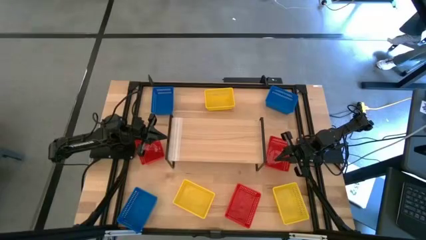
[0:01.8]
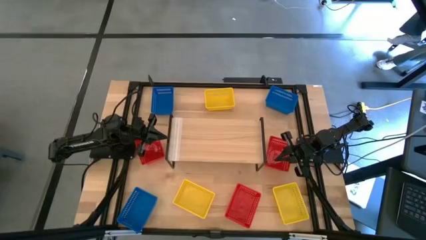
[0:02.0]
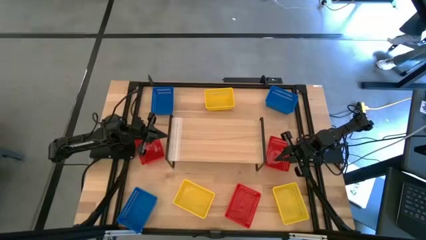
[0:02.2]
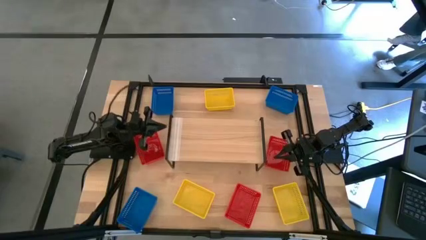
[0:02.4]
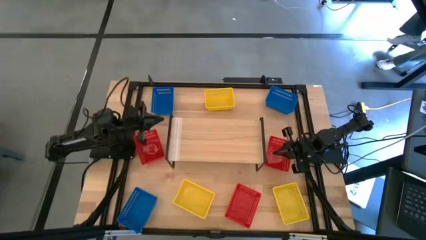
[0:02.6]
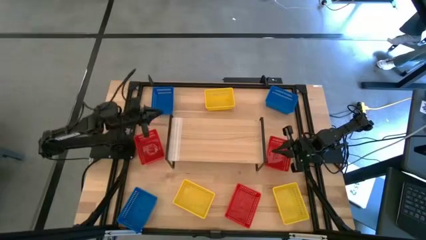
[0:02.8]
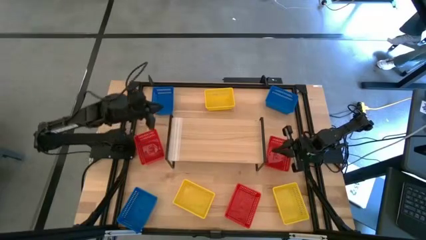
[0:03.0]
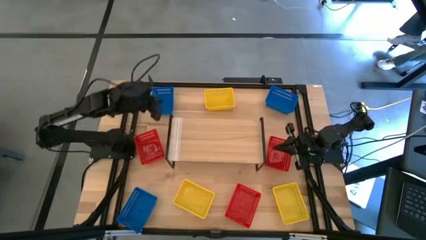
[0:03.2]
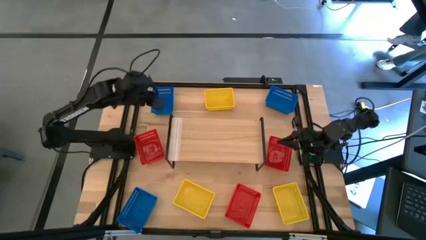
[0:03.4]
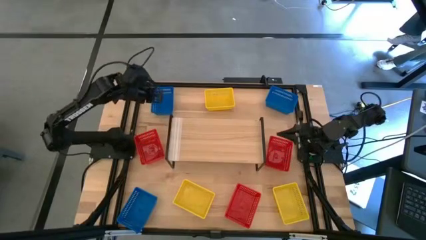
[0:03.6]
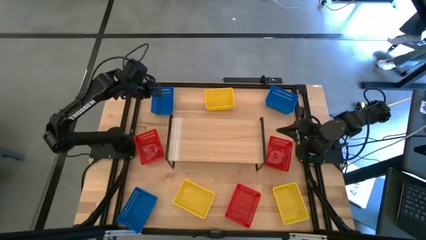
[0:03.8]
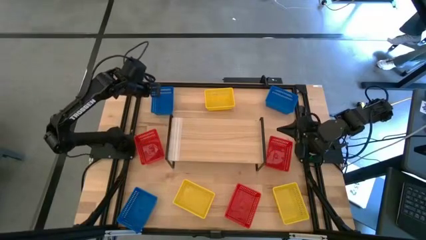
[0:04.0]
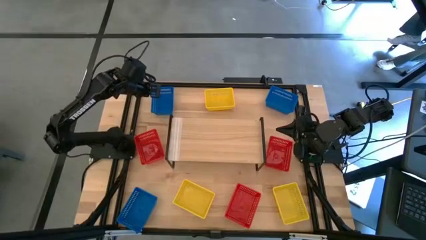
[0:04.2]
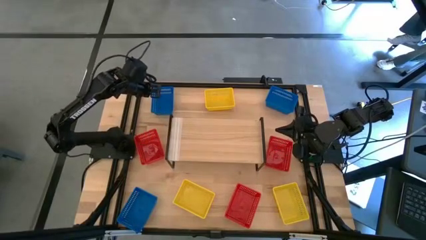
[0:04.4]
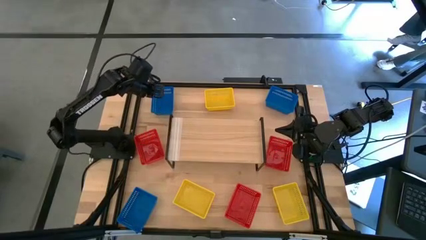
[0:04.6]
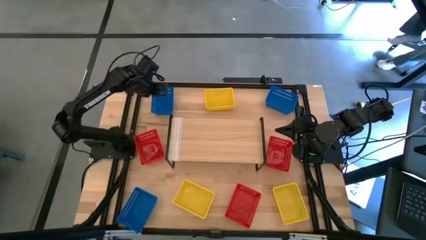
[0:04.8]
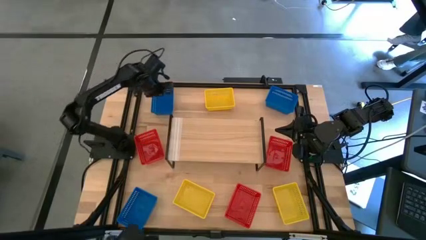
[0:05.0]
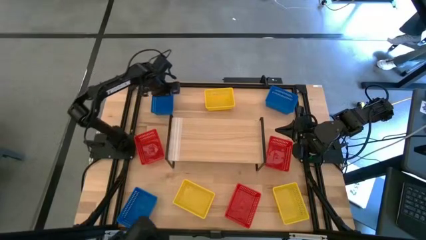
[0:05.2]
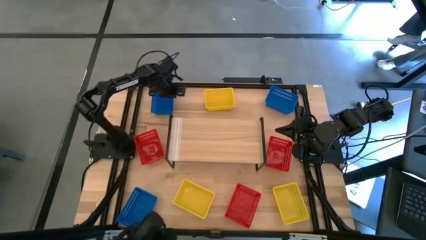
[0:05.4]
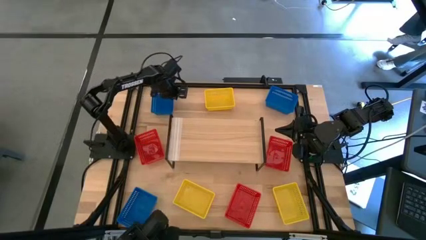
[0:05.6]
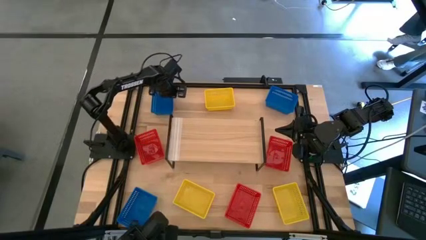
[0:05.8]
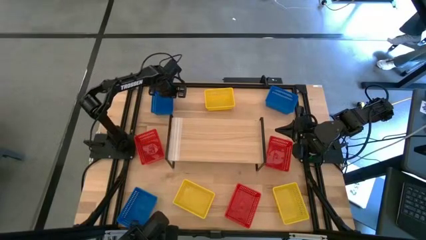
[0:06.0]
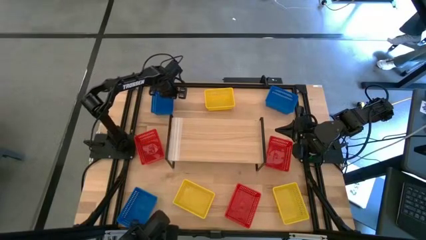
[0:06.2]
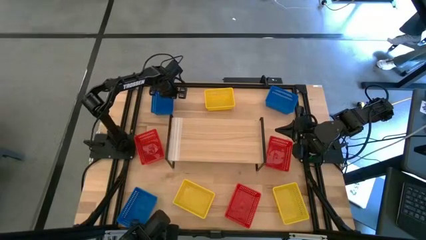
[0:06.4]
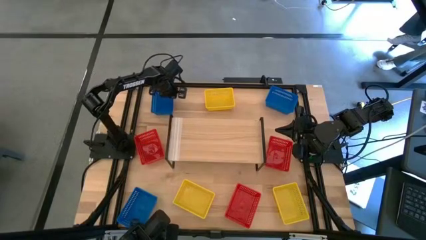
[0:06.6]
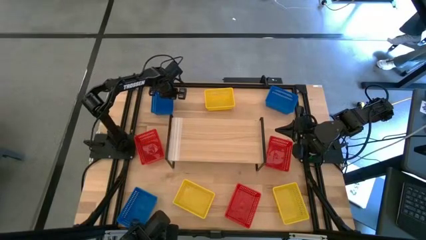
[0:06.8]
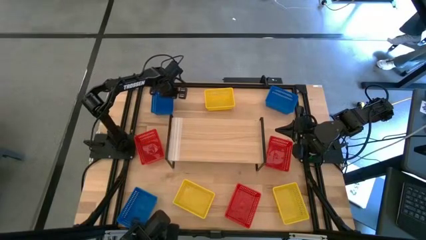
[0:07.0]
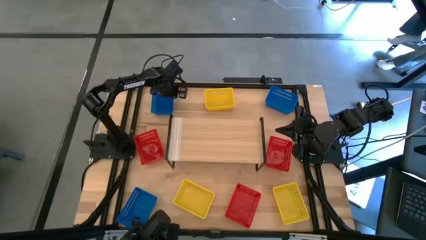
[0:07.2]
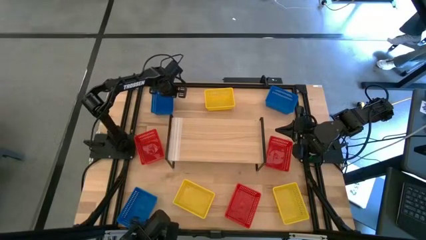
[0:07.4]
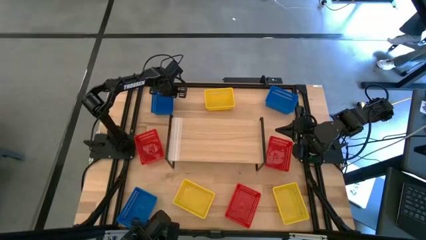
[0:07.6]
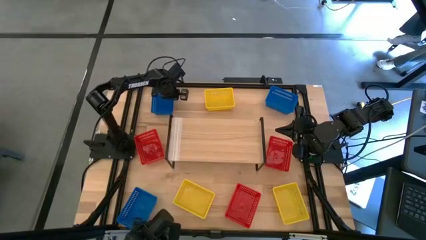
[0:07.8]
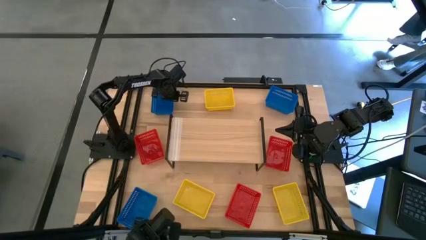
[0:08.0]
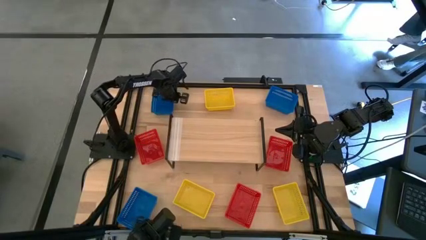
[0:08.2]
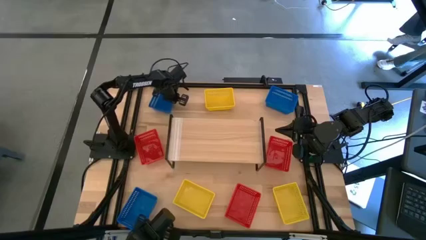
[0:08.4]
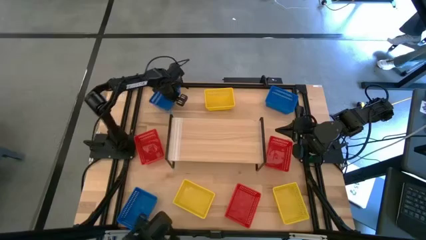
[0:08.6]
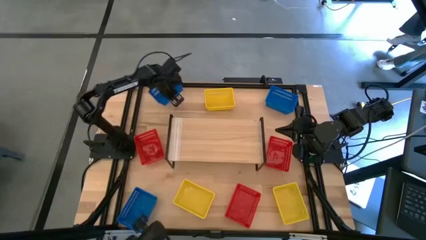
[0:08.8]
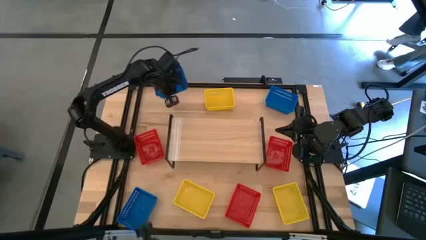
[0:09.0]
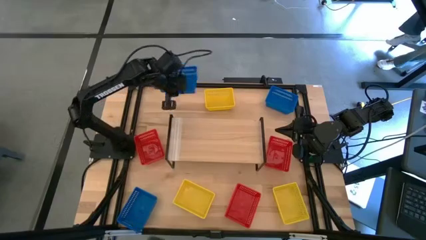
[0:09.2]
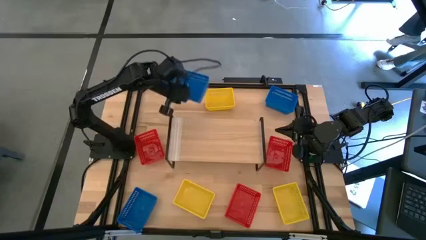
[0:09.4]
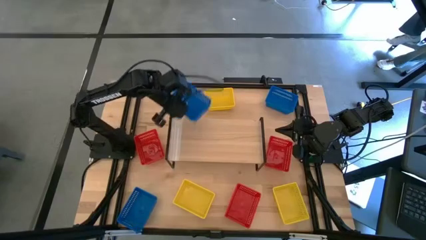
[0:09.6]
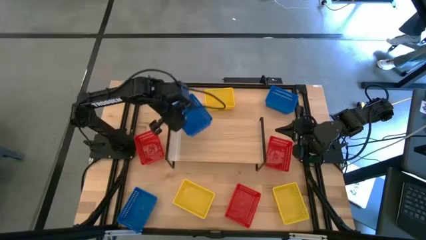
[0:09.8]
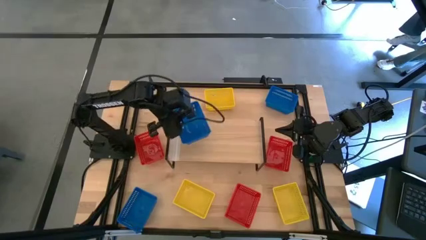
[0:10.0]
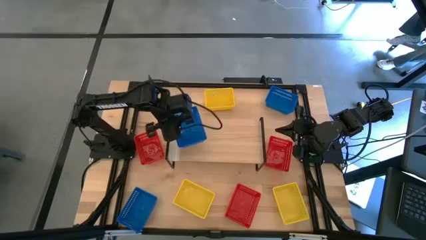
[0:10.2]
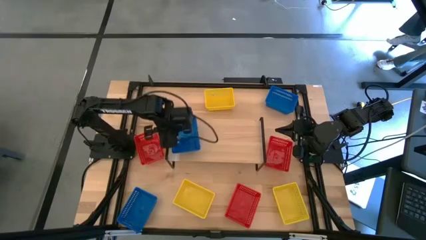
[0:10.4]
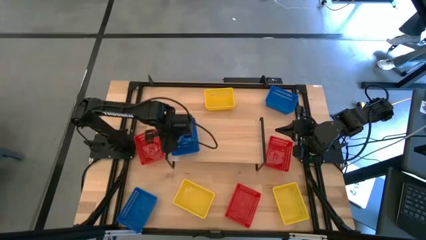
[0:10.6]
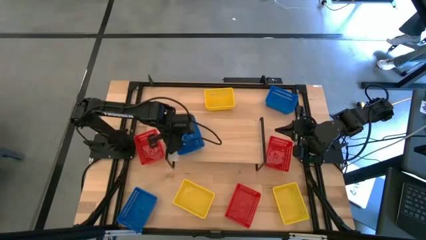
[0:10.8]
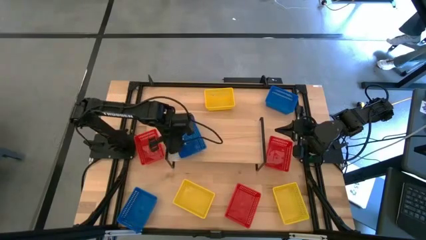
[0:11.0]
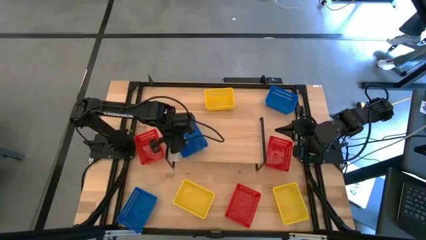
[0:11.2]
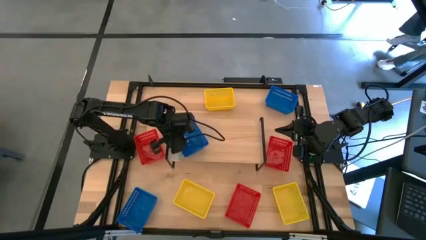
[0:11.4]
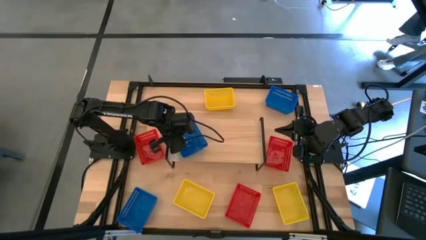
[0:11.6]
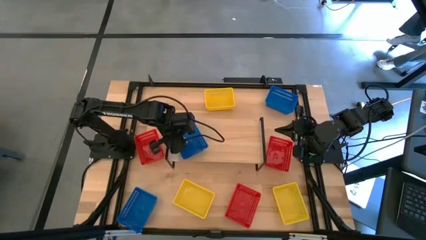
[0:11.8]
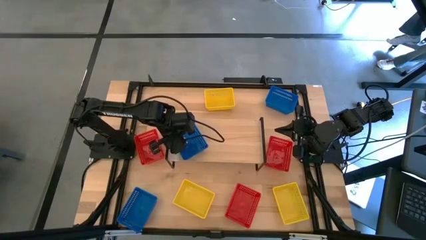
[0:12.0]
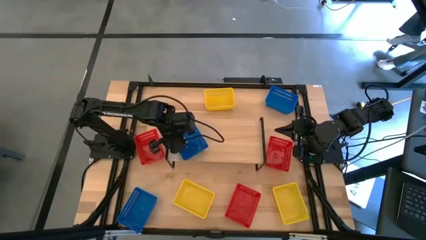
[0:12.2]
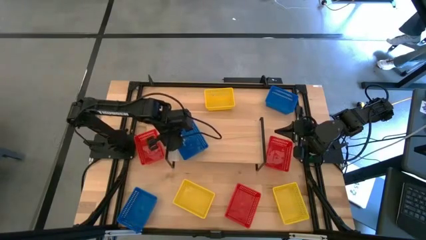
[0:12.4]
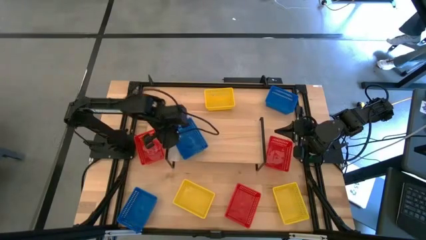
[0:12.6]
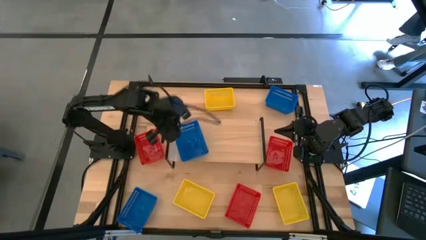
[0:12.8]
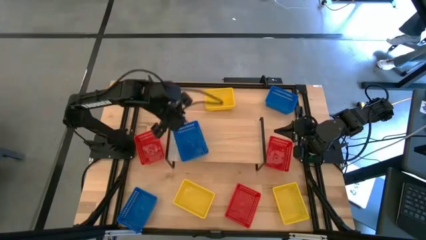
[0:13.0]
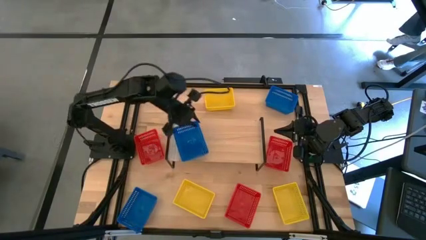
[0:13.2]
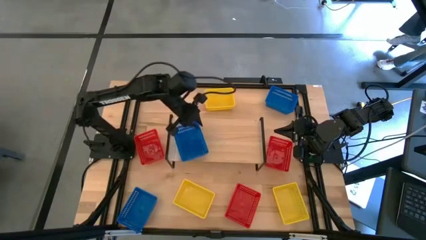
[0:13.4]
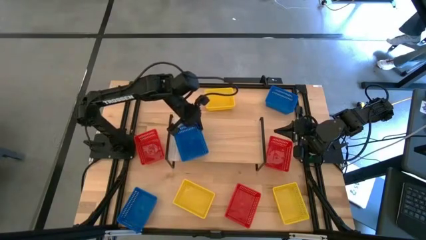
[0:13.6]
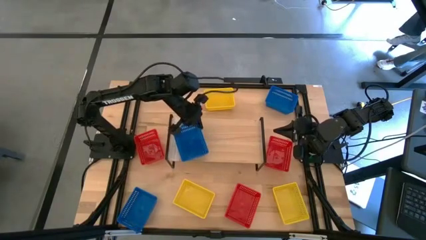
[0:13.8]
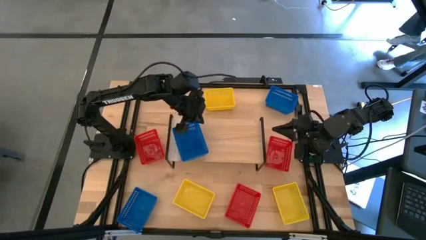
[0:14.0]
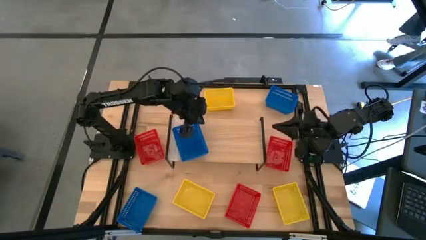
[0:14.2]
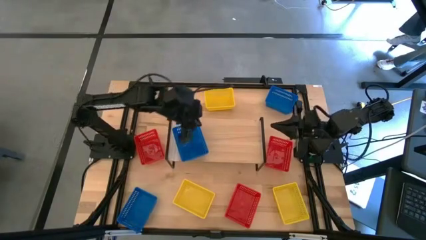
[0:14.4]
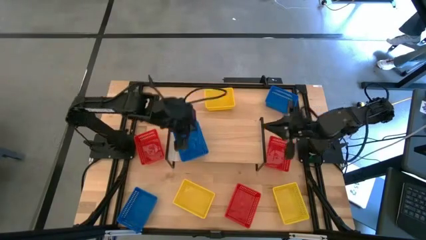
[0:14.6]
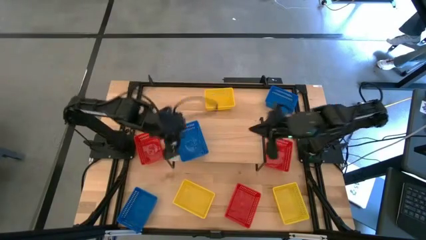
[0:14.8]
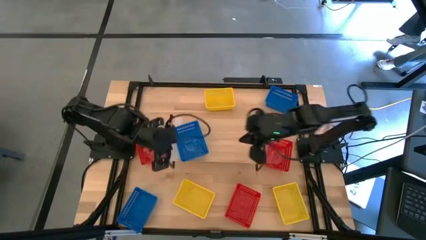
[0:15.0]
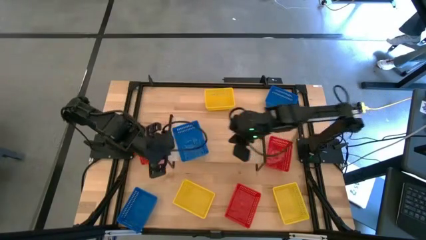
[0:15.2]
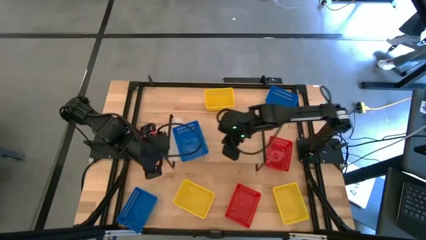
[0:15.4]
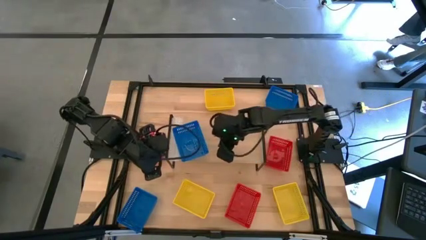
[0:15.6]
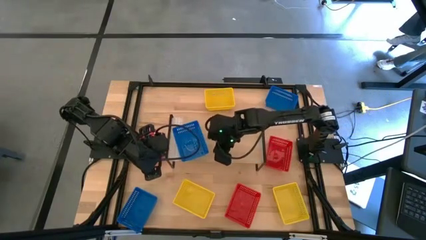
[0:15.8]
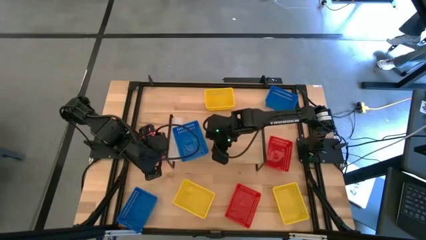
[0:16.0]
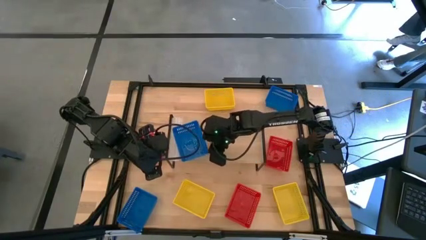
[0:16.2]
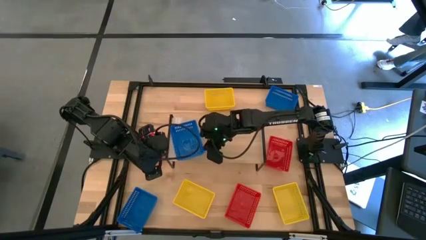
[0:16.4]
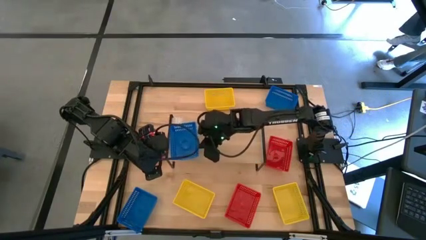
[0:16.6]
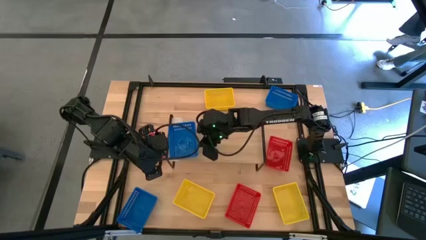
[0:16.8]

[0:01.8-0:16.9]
Task: Stack baskets on shelf by color
Put the top left blue bin on the shelf
